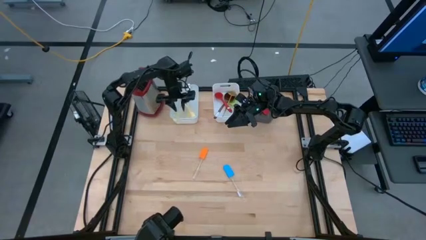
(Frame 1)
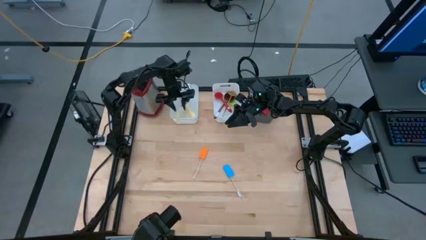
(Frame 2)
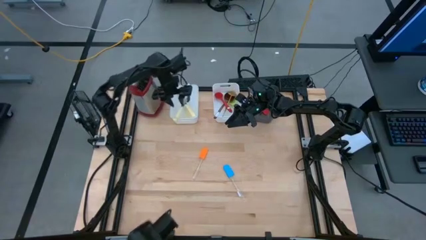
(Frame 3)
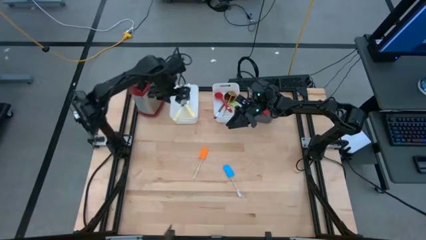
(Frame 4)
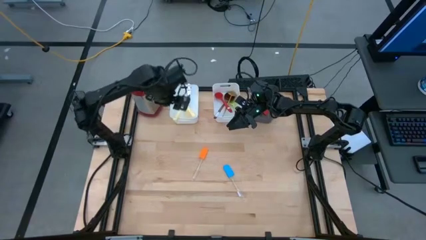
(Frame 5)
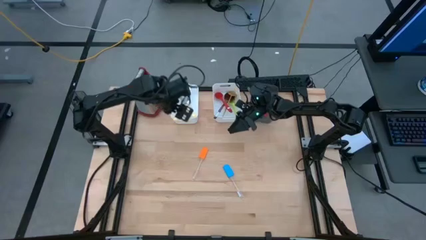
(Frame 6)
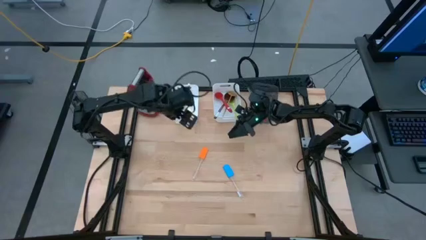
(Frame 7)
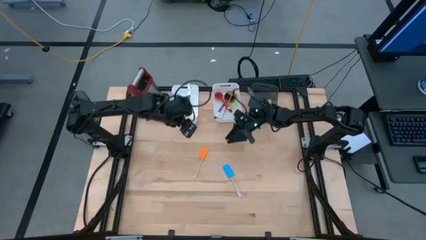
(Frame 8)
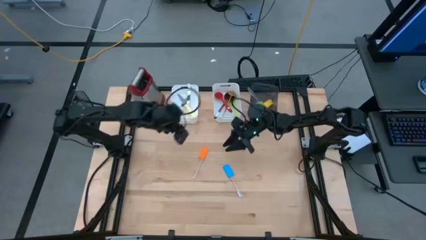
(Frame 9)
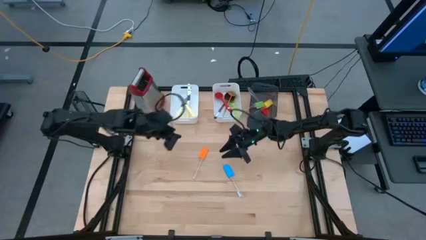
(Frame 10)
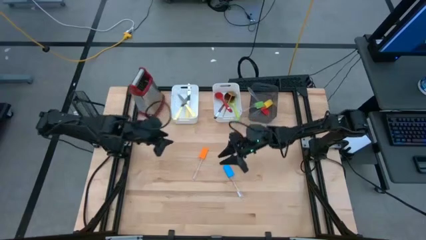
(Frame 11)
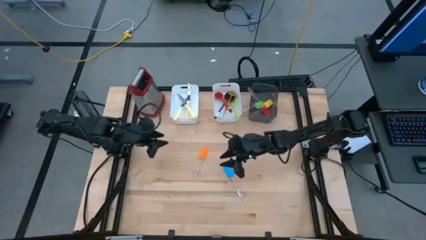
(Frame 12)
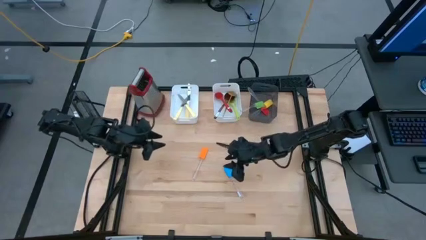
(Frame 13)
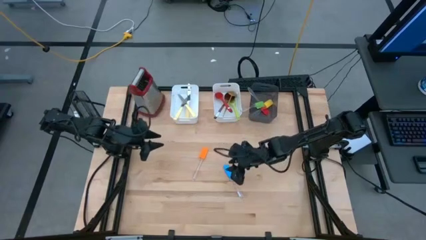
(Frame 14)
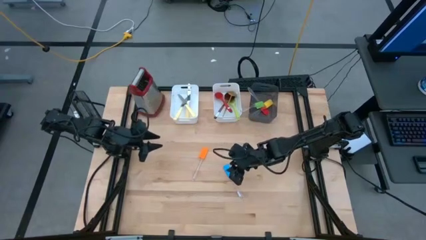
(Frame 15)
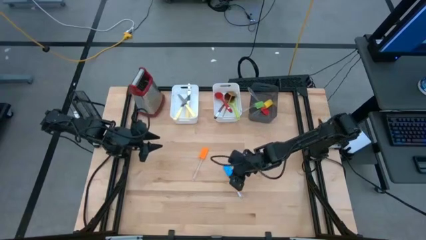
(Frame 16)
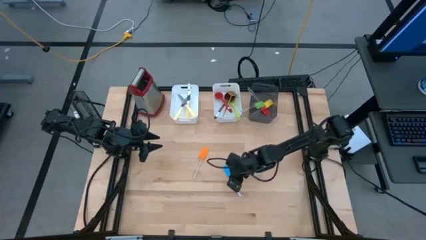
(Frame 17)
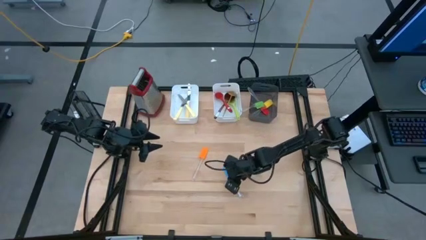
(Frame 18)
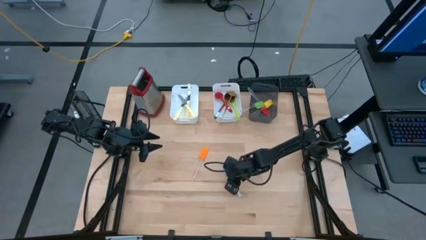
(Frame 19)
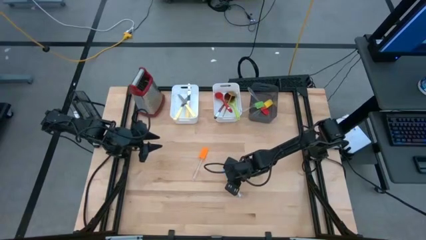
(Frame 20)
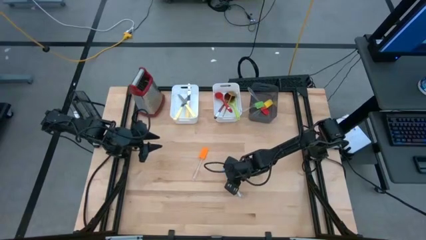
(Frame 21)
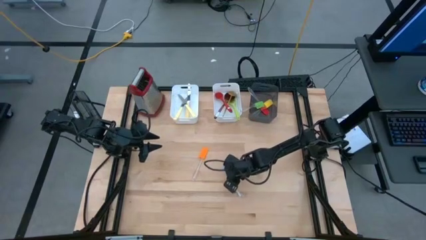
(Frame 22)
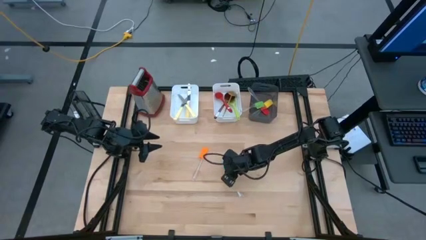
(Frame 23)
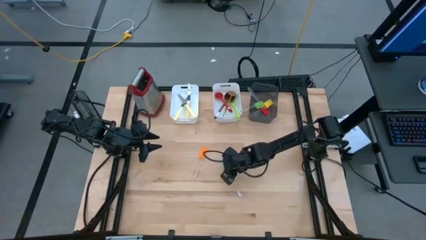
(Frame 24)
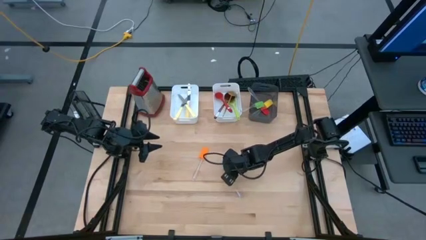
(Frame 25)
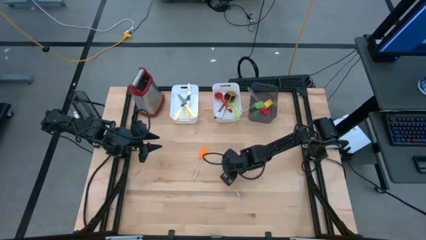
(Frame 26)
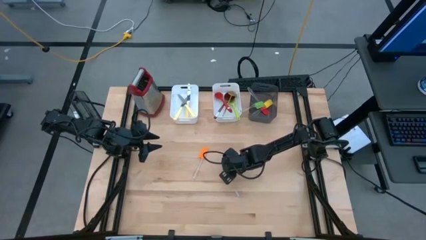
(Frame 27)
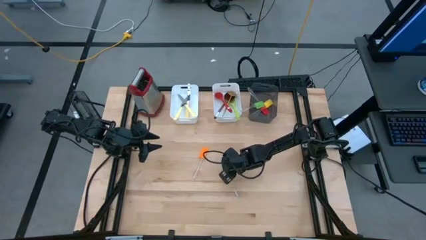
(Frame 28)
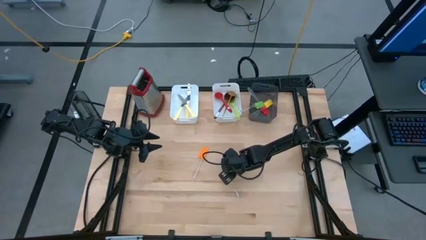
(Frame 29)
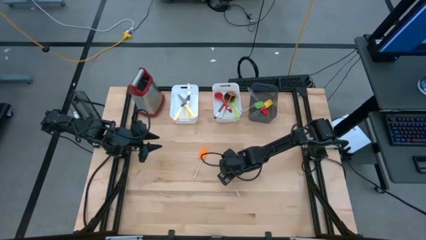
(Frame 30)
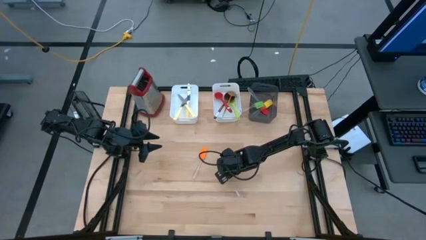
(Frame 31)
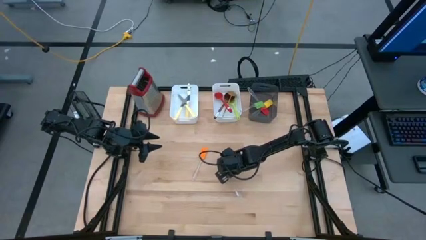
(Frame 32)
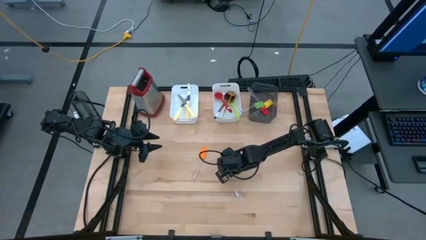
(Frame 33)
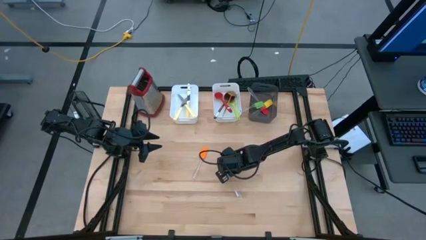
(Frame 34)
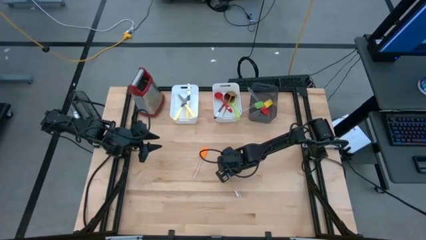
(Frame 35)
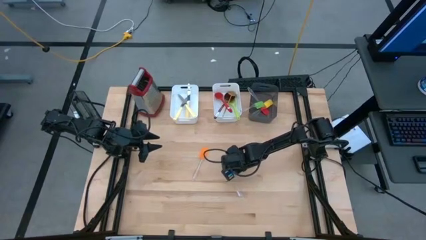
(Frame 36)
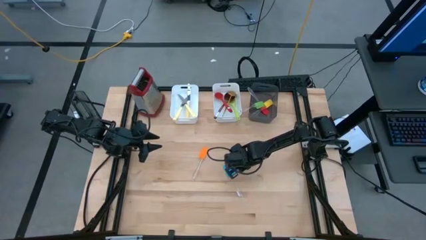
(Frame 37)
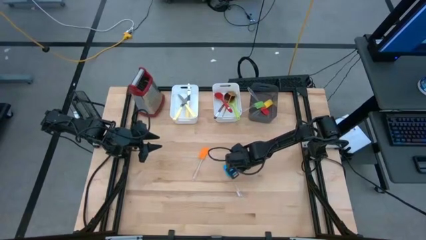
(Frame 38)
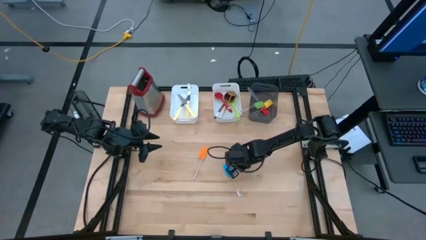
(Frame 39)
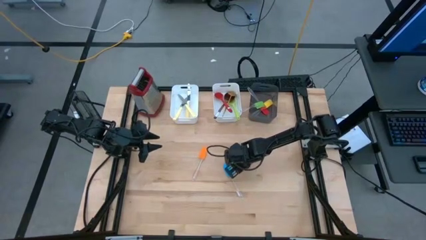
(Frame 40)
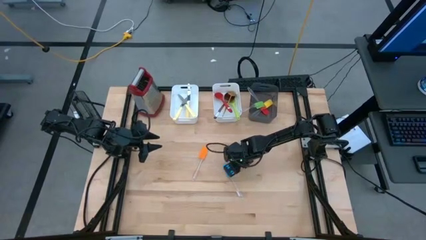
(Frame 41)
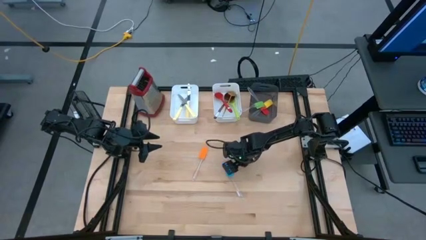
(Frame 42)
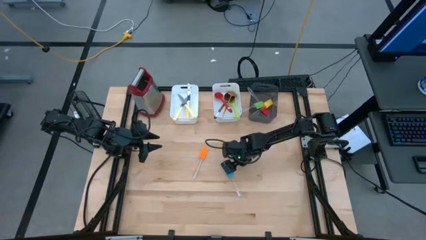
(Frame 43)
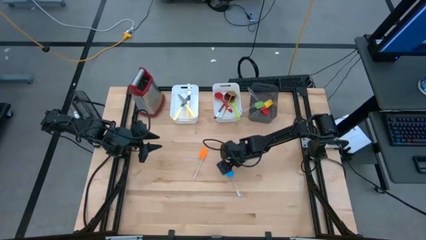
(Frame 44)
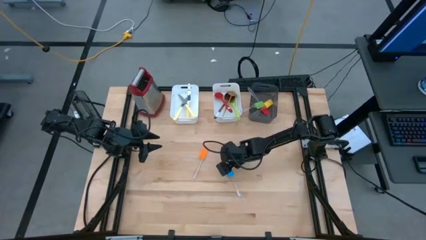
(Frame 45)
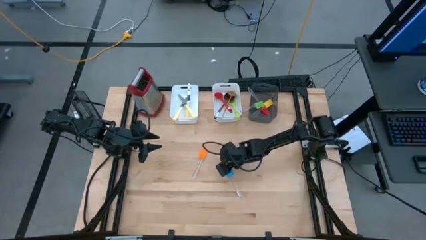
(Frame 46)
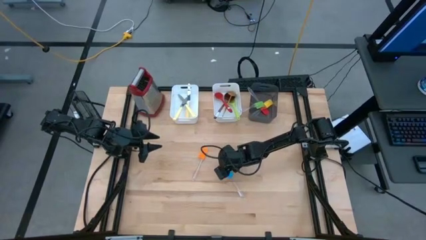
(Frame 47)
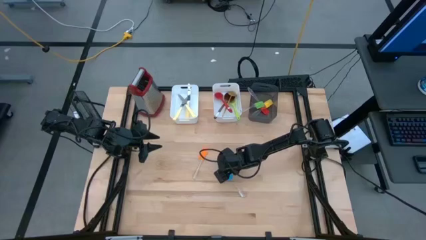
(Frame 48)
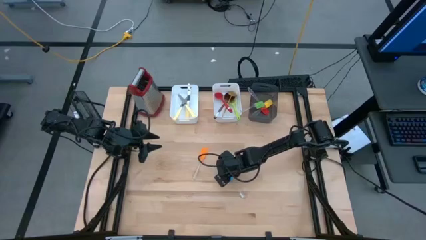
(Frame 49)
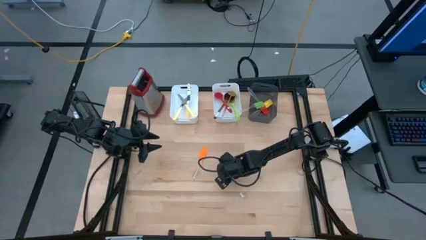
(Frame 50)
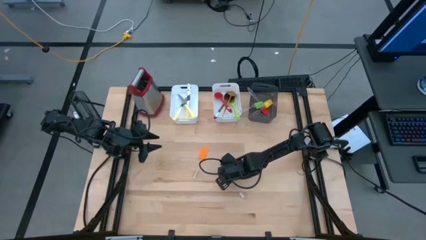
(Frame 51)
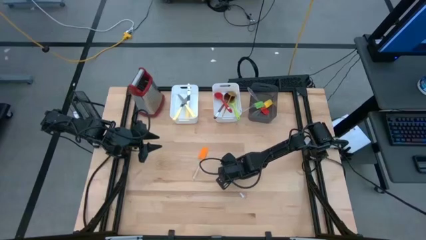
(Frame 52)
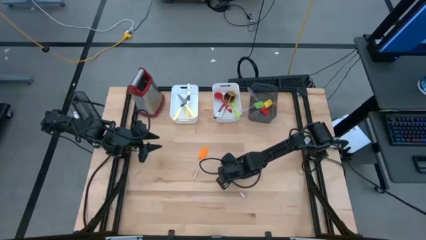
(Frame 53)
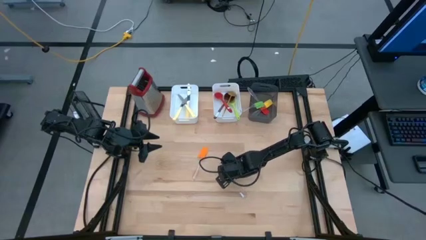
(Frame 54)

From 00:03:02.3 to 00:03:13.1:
Task: Pick & Place Kitchen Items
Put the blue spatula into the black bin
